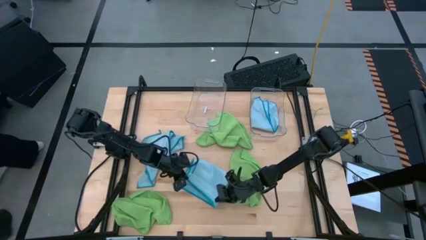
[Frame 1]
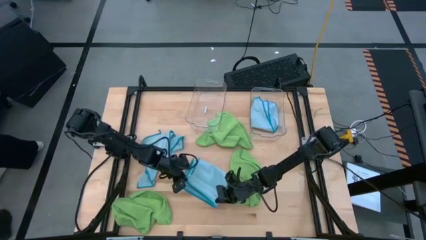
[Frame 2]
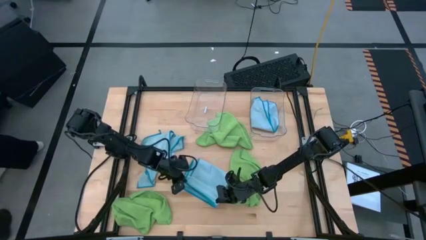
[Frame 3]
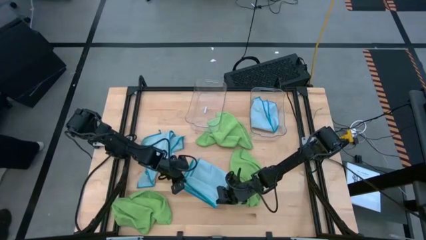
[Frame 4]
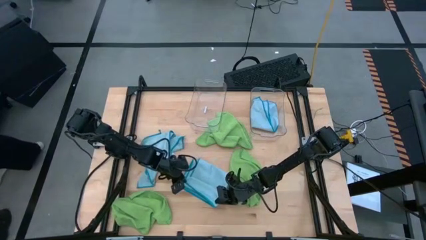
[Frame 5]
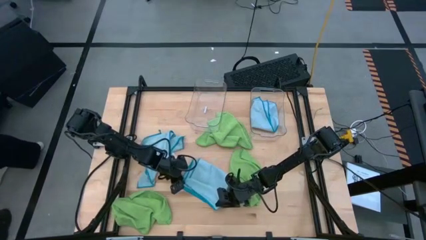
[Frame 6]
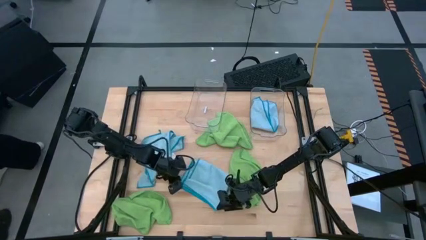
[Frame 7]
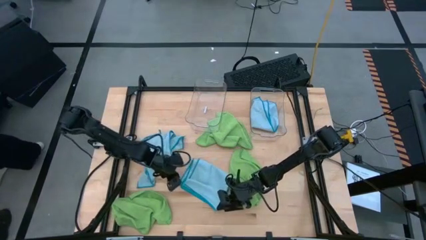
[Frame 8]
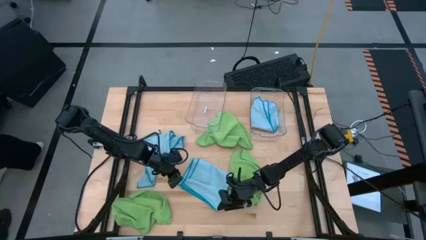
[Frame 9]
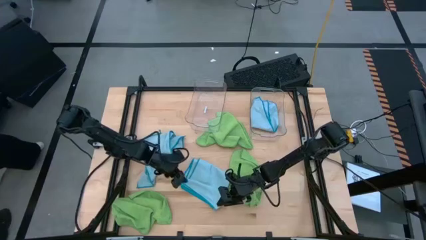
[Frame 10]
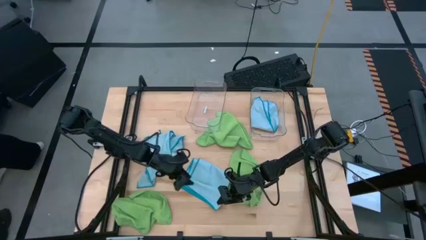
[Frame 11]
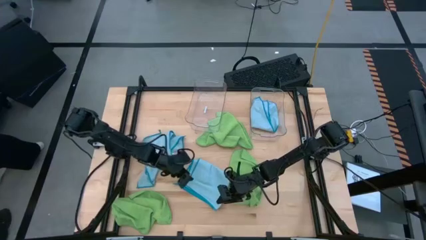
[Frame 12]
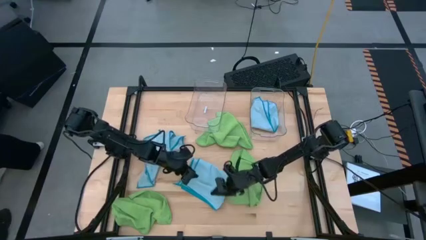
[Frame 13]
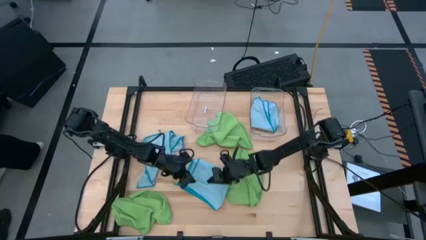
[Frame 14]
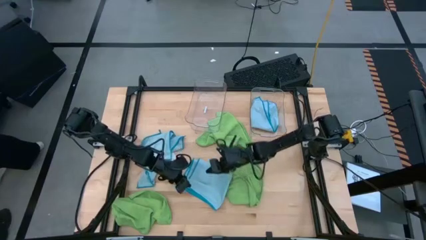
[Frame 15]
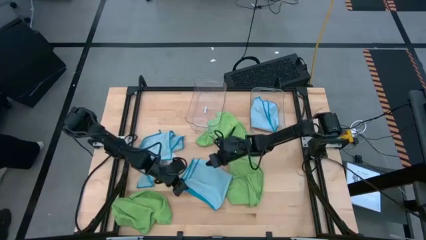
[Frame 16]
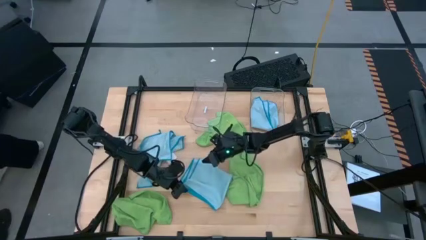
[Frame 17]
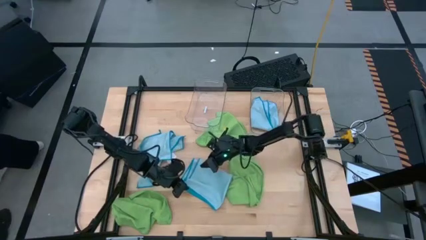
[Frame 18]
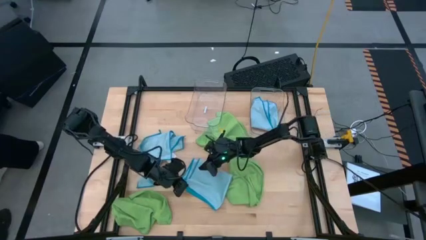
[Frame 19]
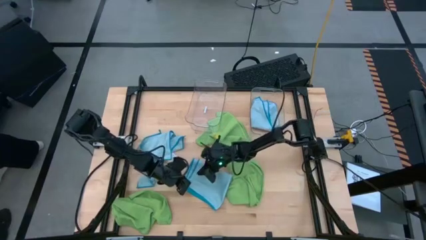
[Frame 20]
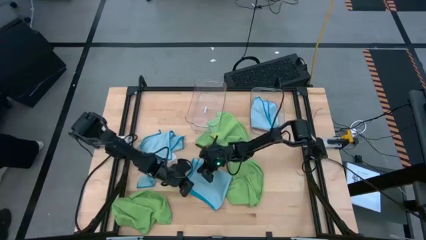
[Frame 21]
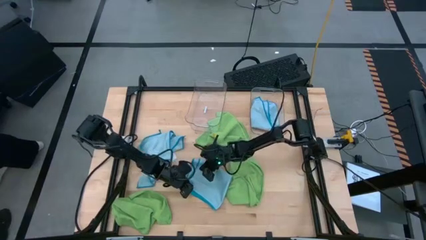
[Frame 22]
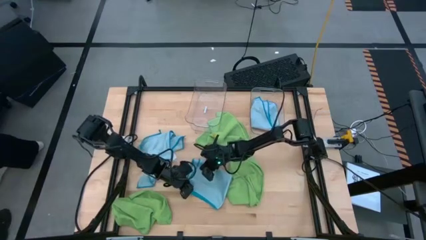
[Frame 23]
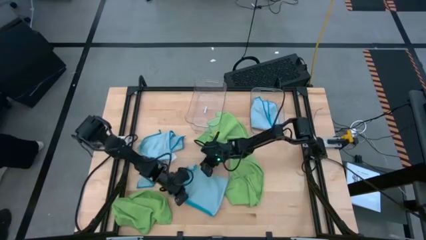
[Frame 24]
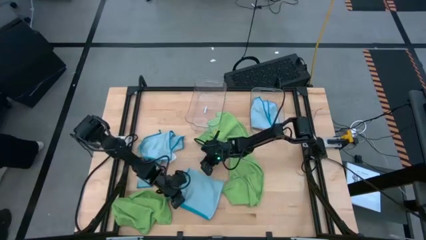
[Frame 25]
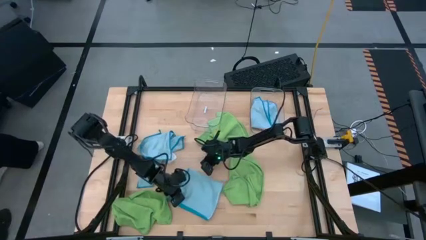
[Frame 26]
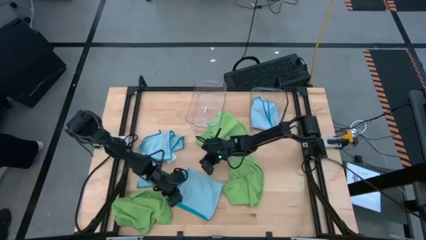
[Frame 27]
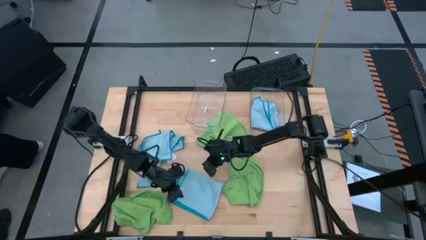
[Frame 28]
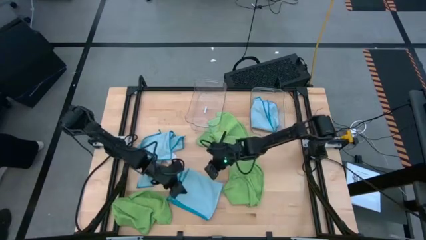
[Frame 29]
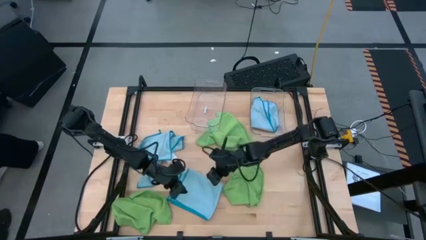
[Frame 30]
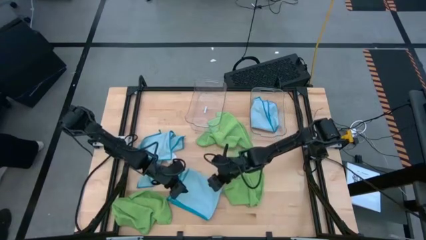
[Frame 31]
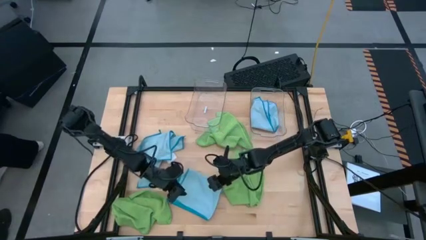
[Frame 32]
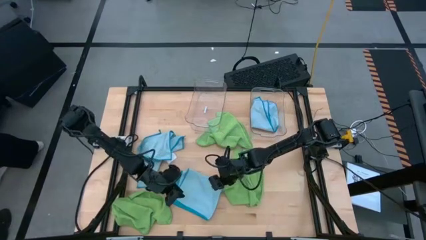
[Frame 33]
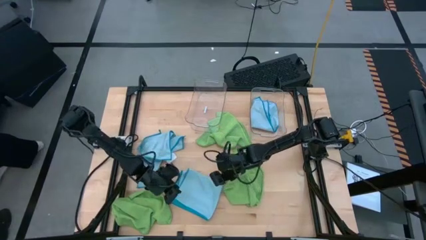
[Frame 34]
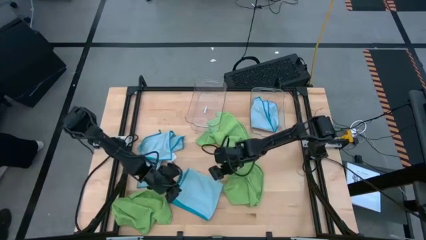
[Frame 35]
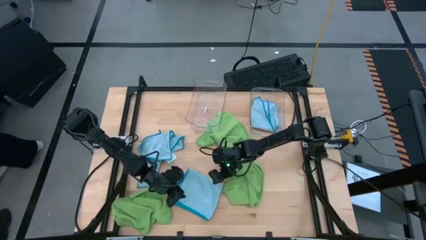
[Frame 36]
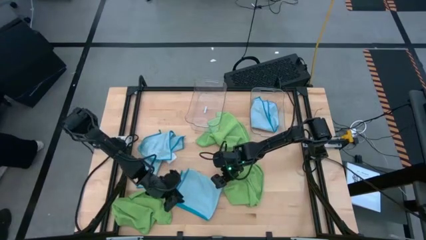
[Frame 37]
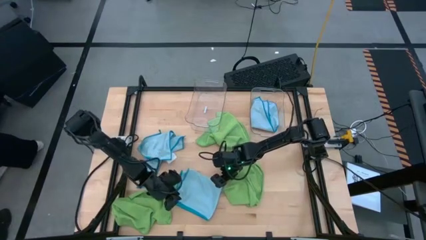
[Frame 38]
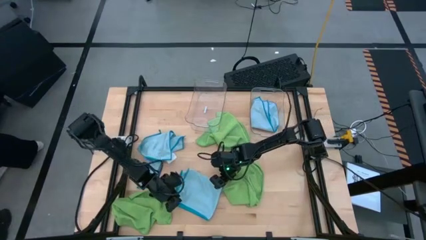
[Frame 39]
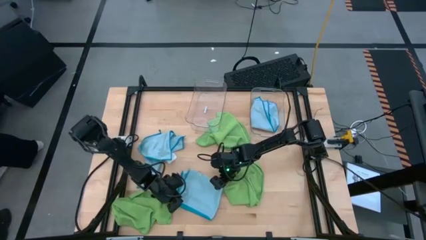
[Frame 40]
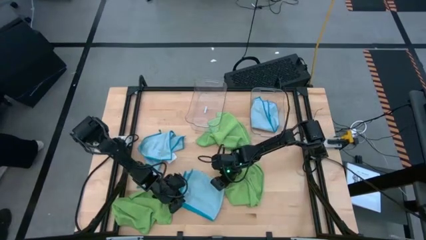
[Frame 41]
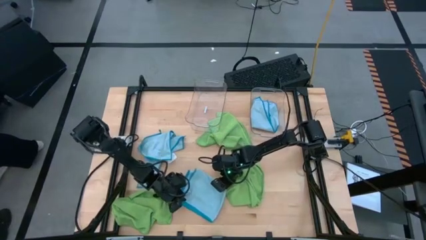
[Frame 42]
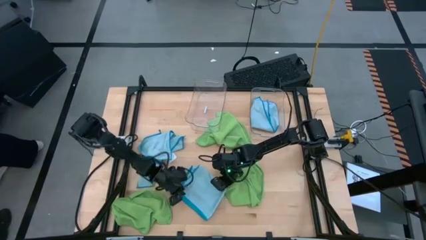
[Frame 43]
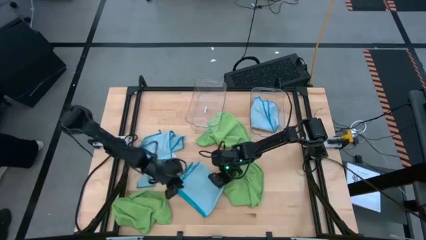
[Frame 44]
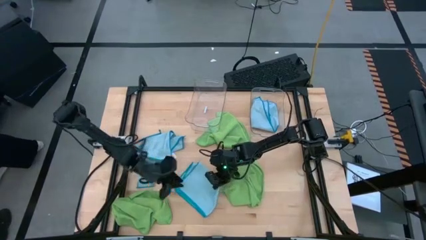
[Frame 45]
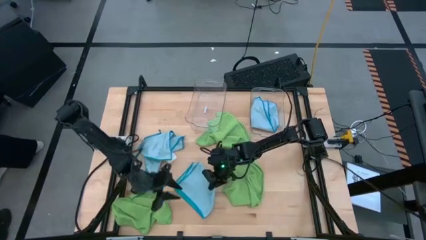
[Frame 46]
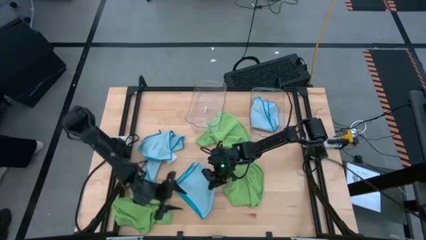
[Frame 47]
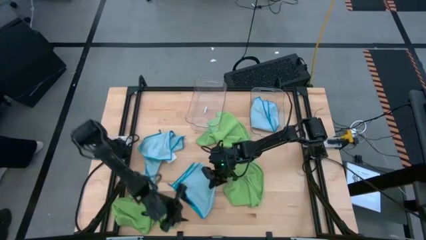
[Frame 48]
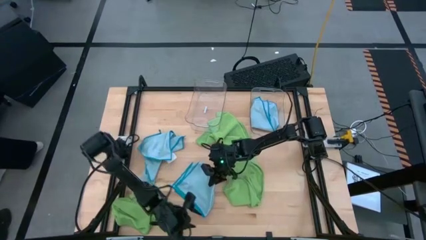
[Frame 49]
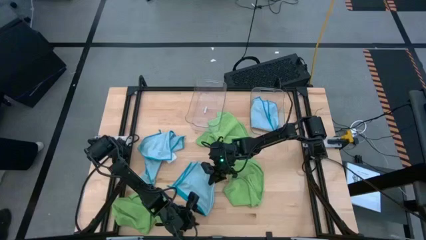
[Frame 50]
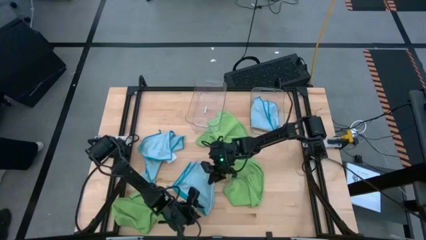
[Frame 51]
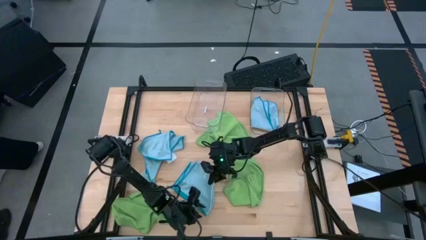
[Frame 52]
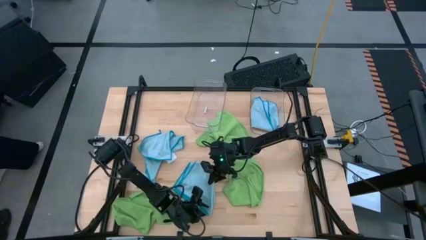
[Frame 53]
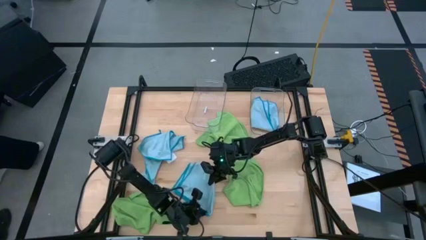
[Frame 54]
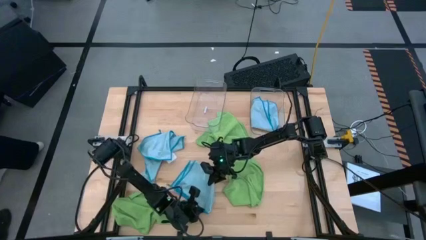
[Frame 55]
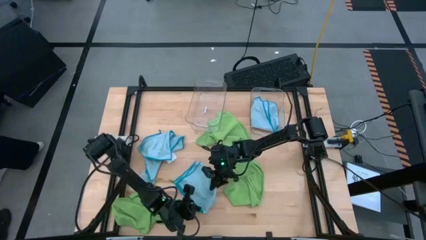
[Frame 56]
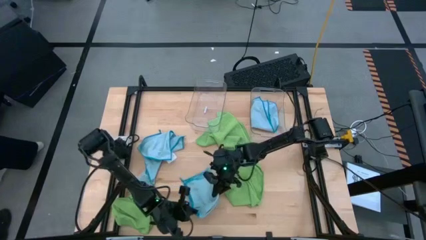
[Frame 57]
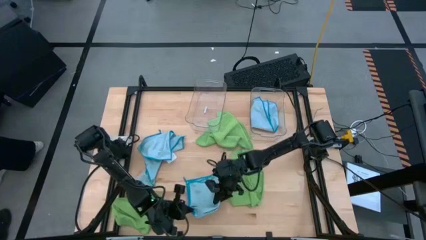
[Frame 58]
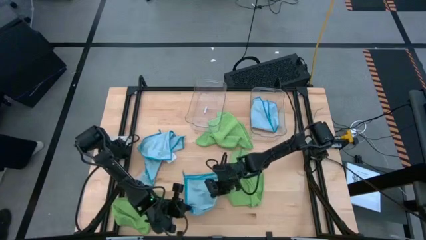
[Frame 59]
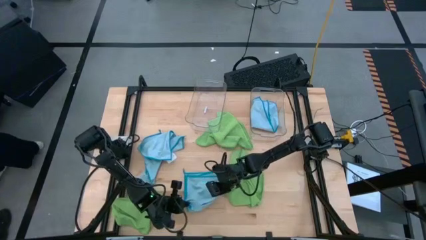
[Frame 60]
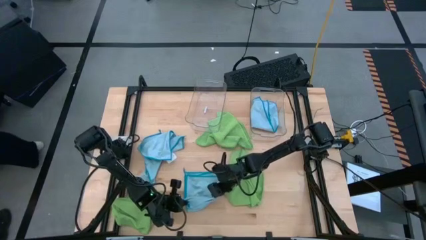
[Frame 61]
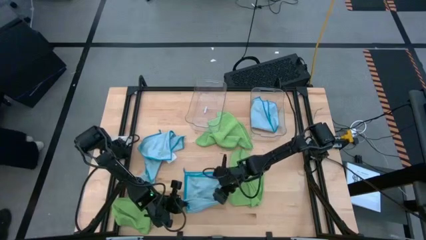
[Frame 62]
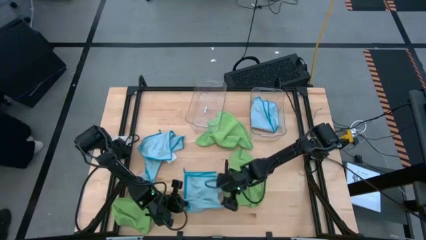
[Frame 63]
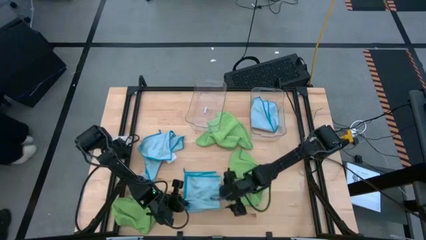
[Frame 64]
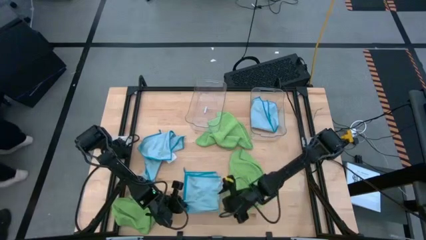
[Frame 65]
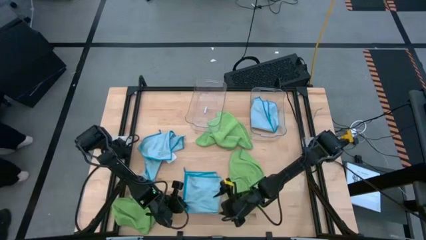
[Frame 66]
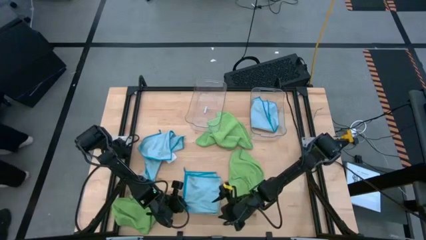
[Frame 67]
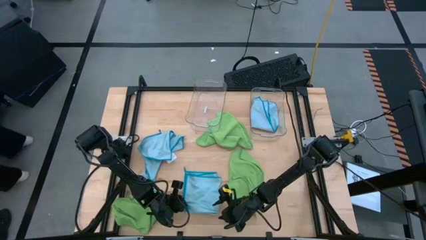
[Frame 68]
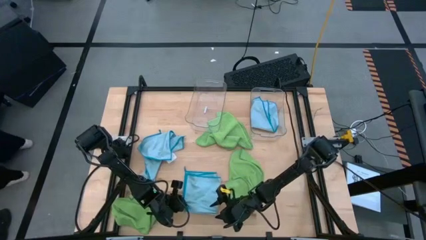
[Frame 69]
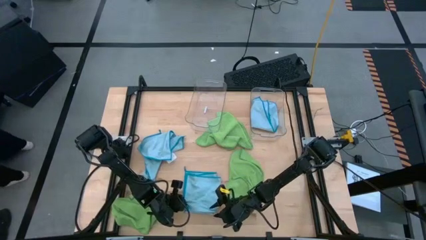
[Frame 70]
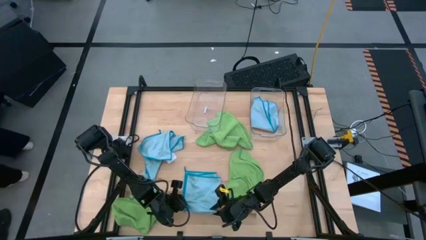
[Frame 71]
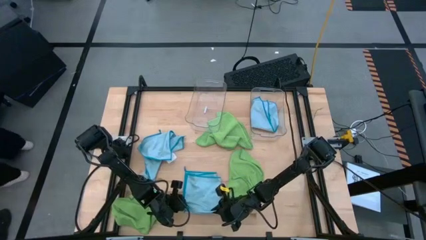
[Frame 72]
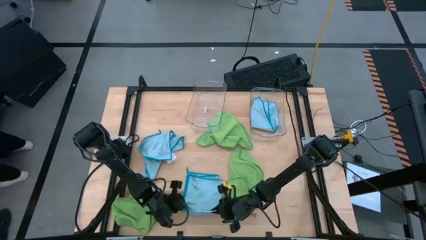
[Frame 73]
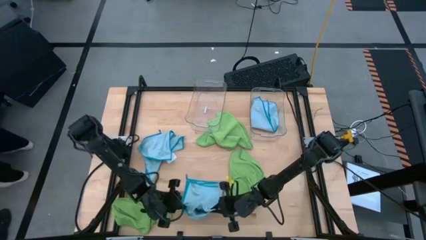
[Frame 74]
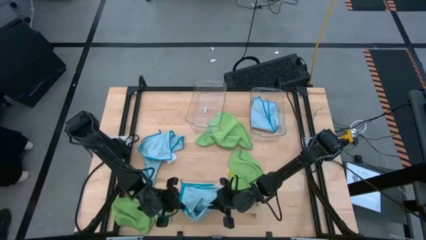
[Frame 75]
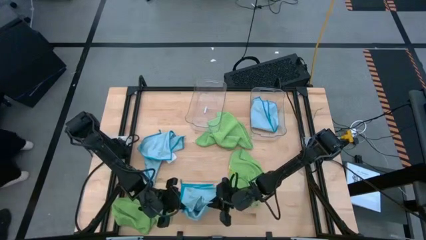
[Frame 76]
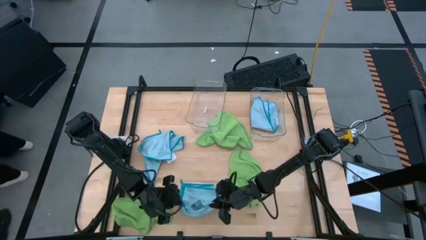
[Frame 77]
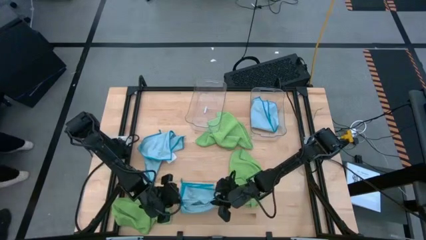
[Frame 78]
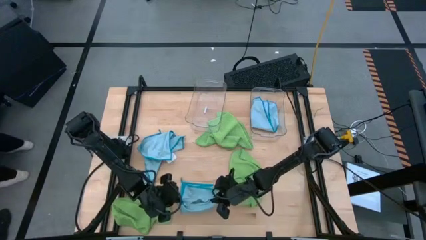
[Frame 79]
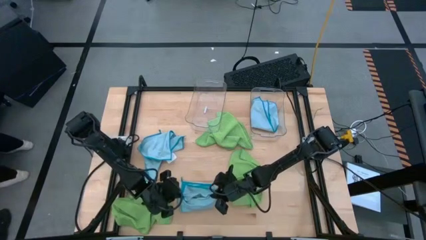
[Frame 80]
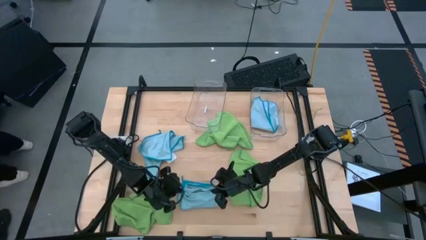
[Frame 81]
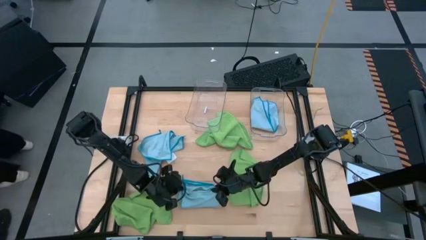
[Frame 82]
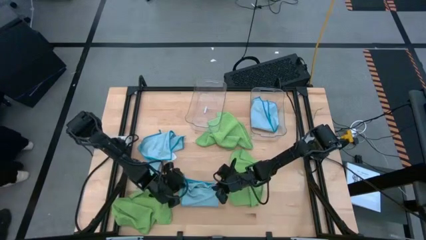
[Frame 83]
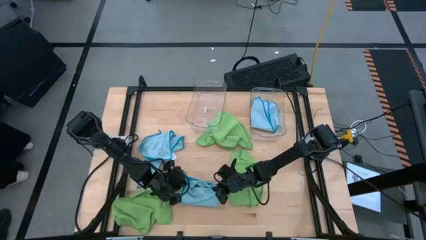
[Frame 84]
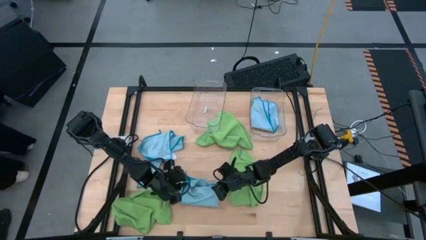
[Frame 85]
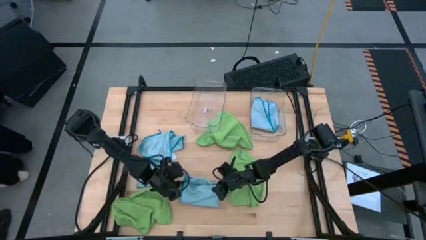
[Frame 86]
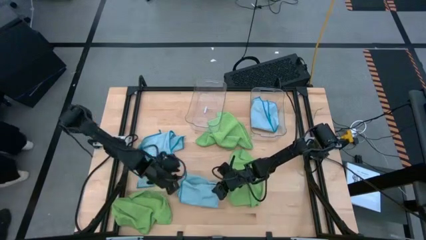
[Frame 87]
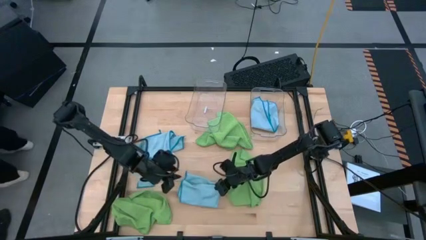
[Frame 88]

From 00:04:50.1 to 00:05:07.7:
Task: Fold microfiber towels
Fold the right blue microfiber towel
